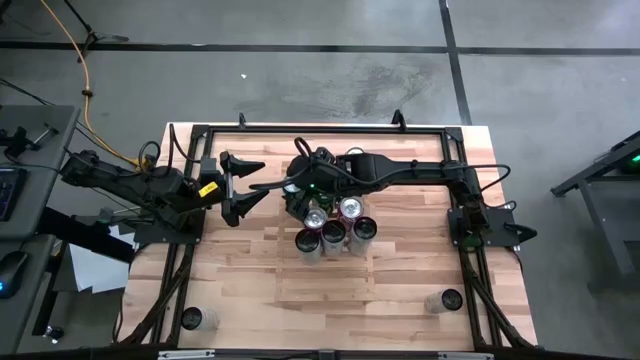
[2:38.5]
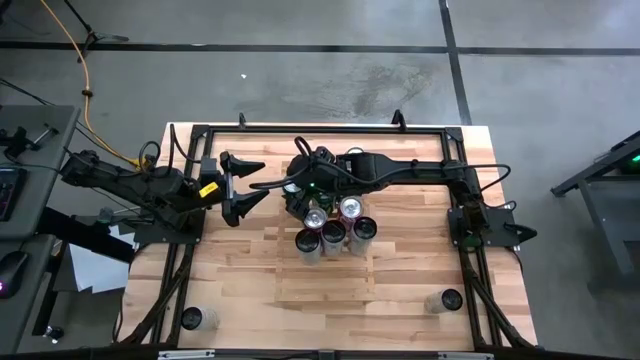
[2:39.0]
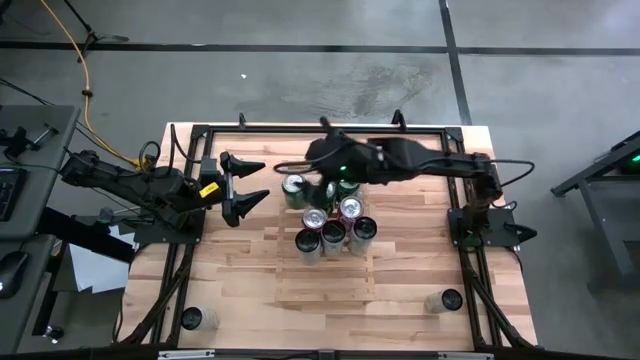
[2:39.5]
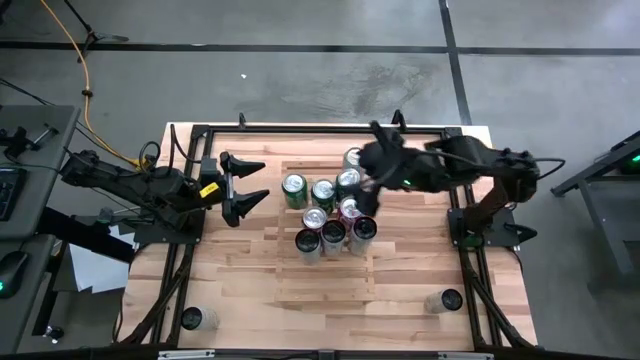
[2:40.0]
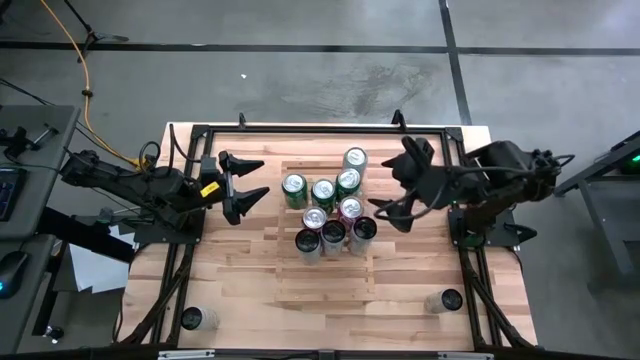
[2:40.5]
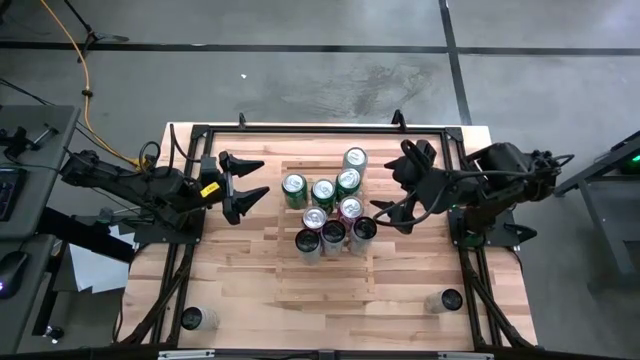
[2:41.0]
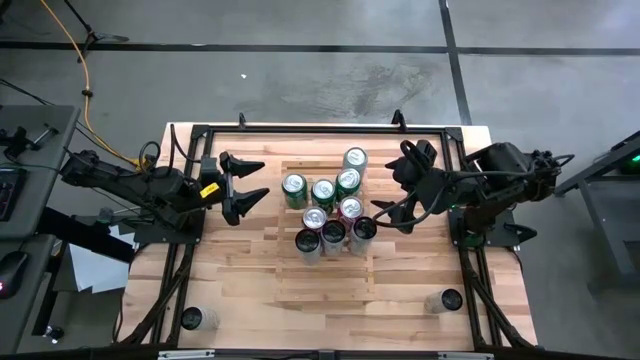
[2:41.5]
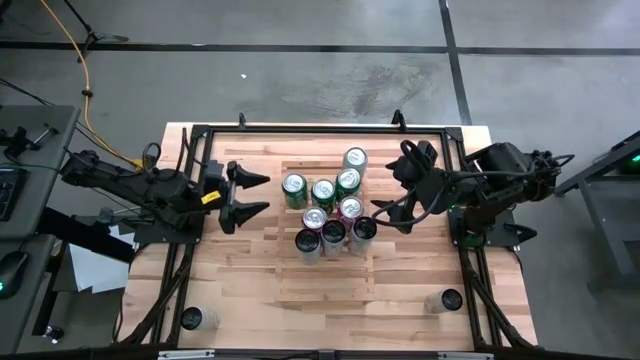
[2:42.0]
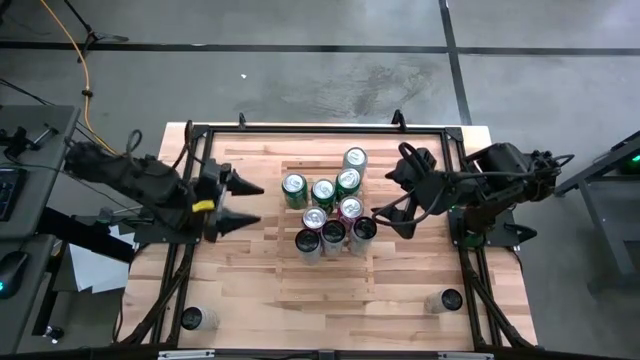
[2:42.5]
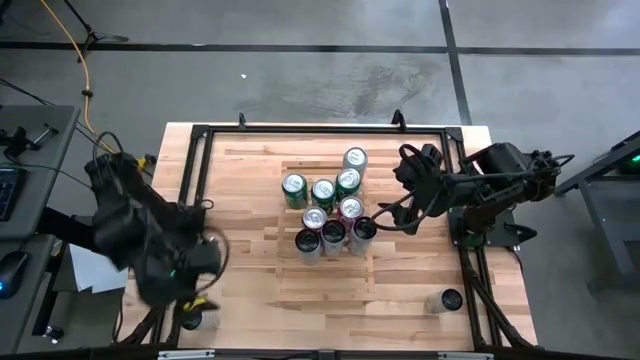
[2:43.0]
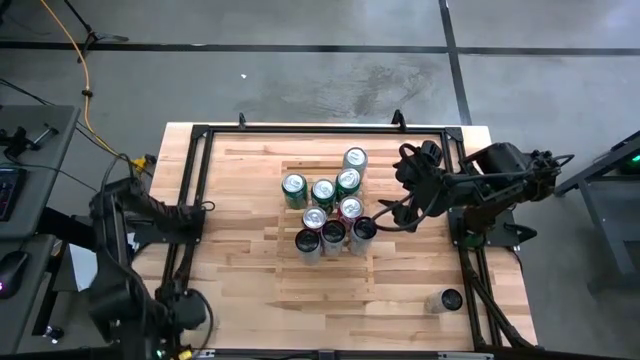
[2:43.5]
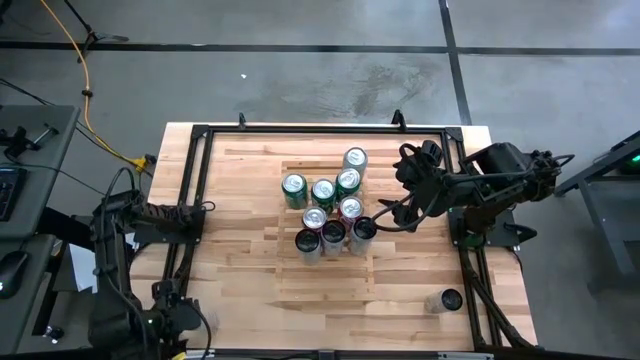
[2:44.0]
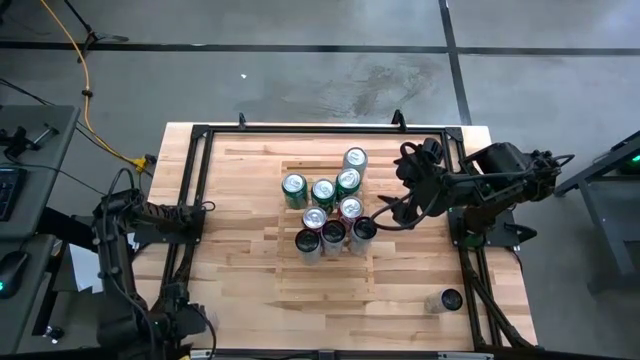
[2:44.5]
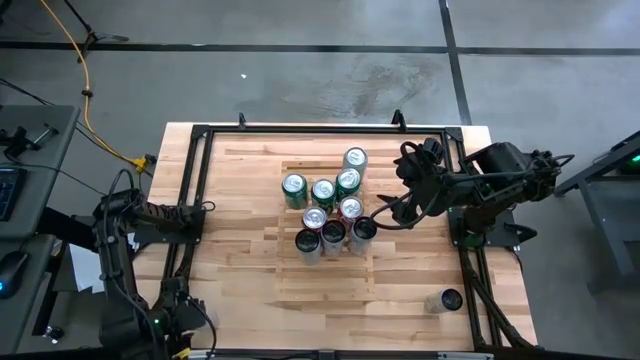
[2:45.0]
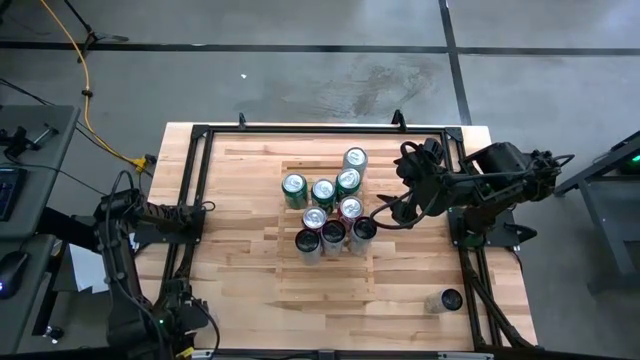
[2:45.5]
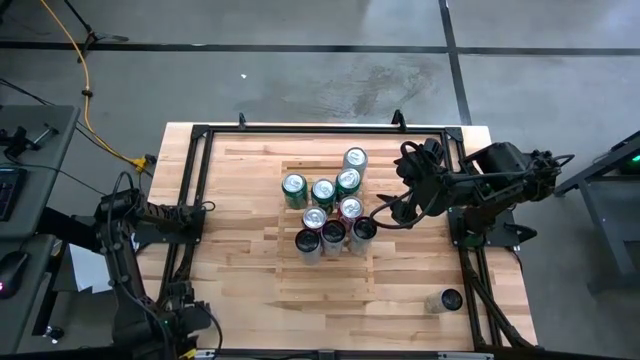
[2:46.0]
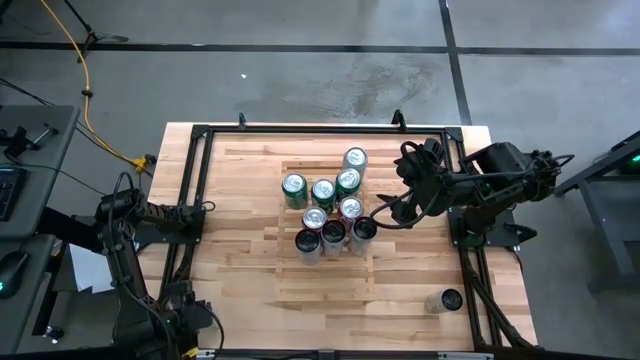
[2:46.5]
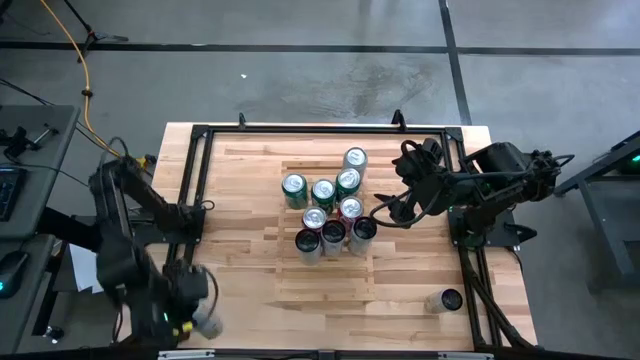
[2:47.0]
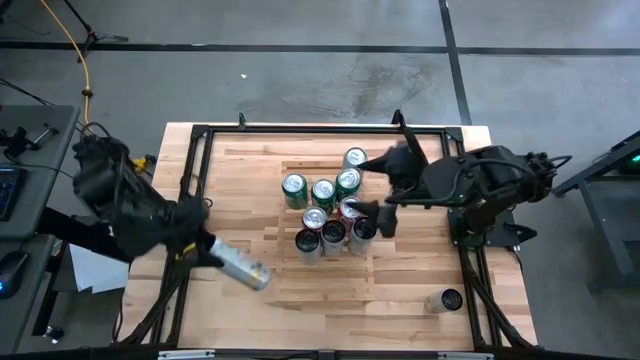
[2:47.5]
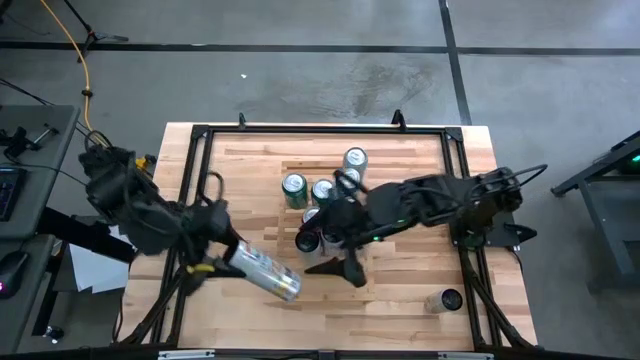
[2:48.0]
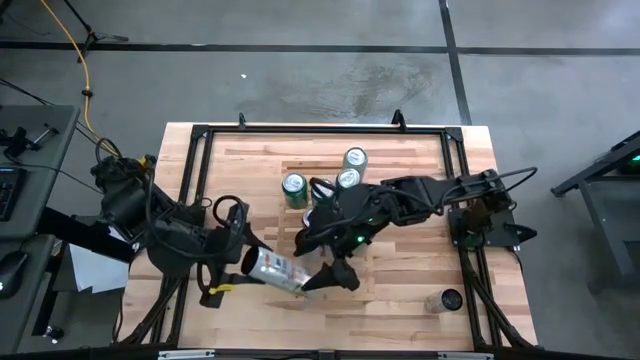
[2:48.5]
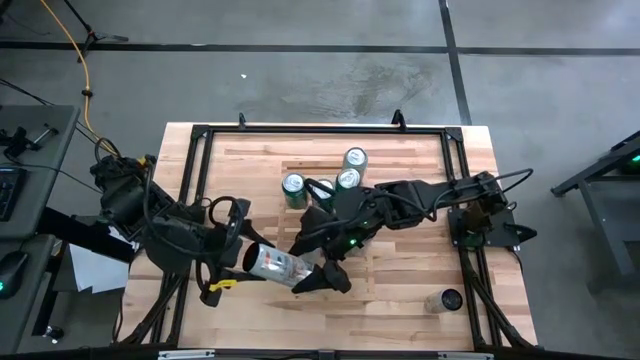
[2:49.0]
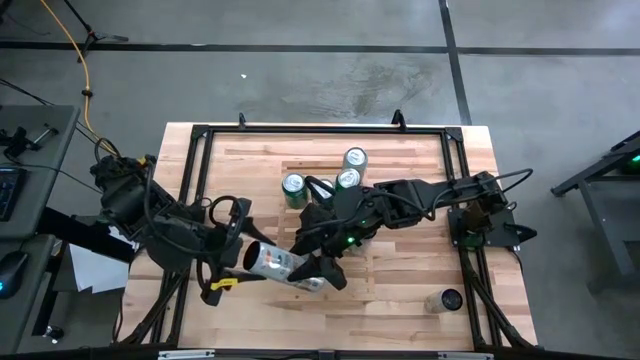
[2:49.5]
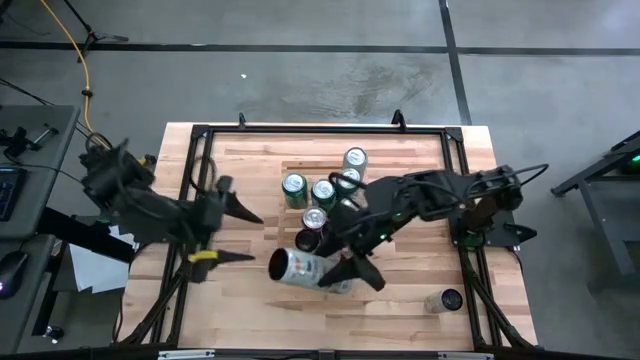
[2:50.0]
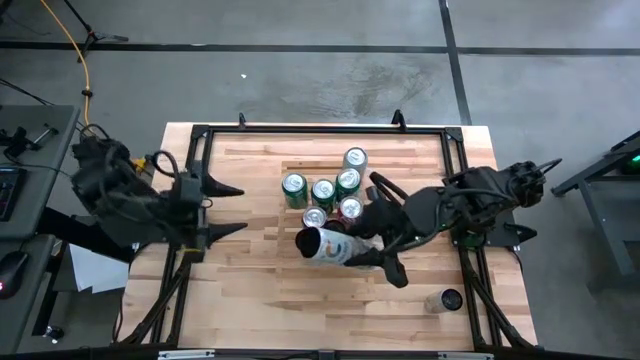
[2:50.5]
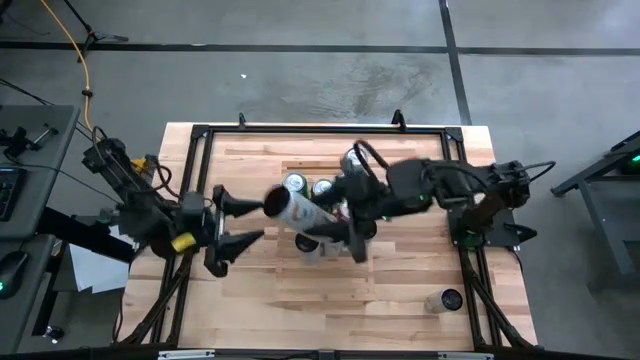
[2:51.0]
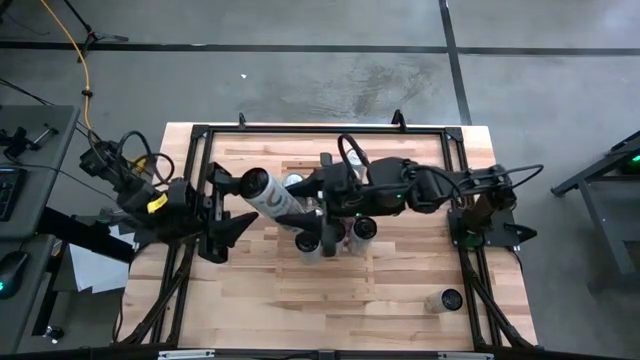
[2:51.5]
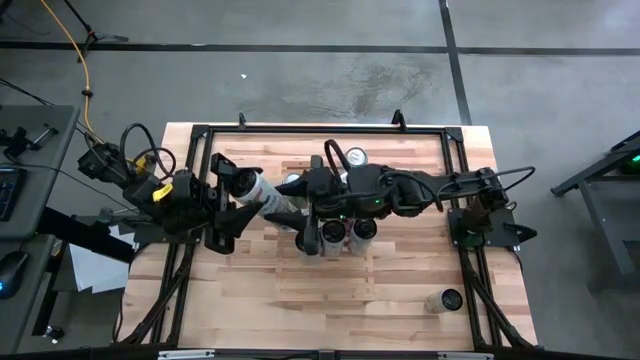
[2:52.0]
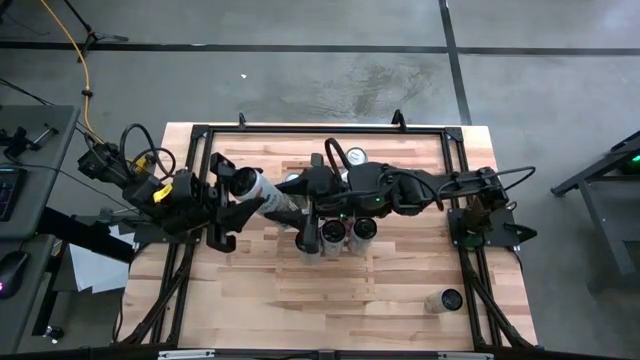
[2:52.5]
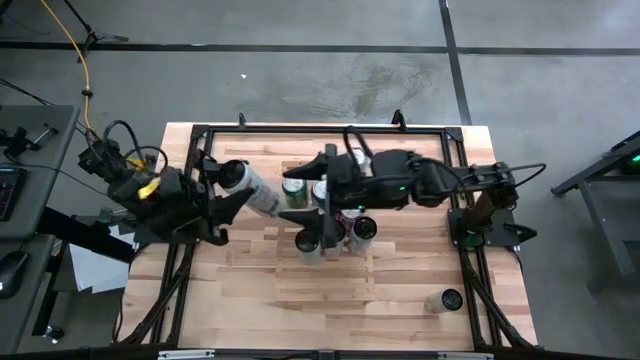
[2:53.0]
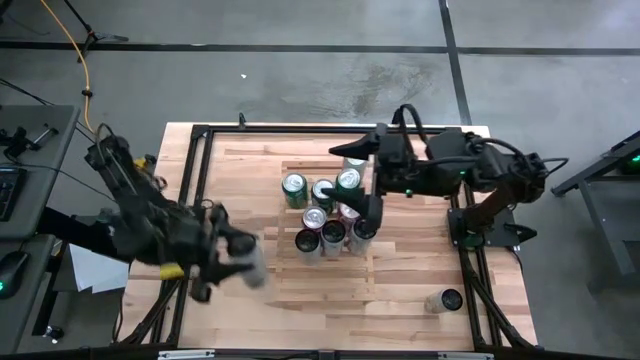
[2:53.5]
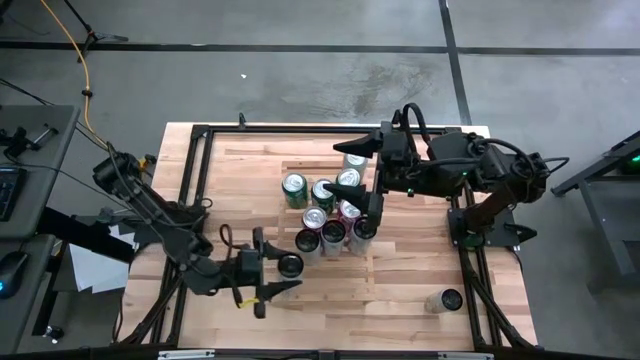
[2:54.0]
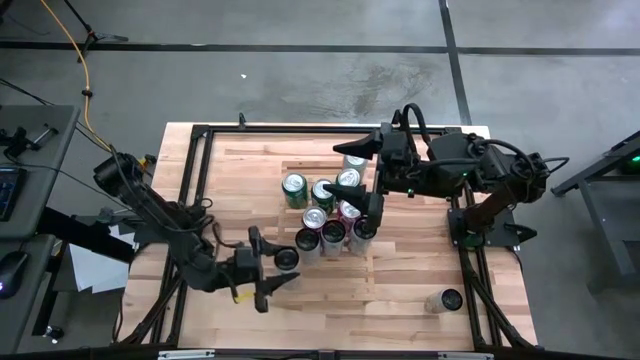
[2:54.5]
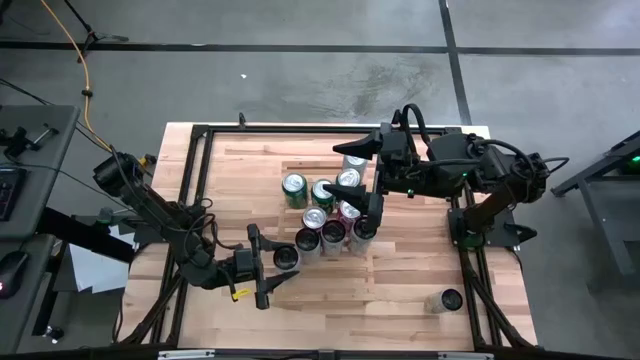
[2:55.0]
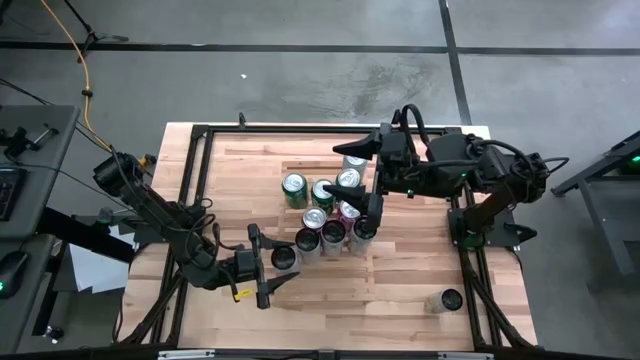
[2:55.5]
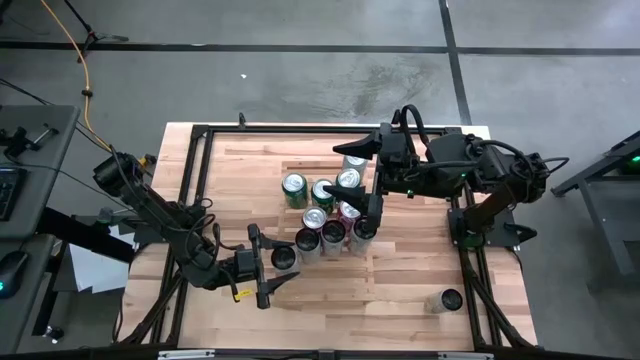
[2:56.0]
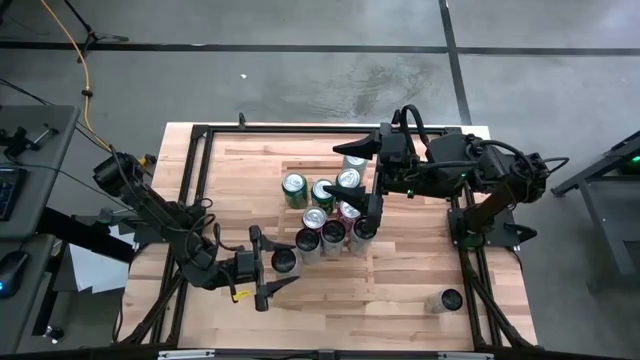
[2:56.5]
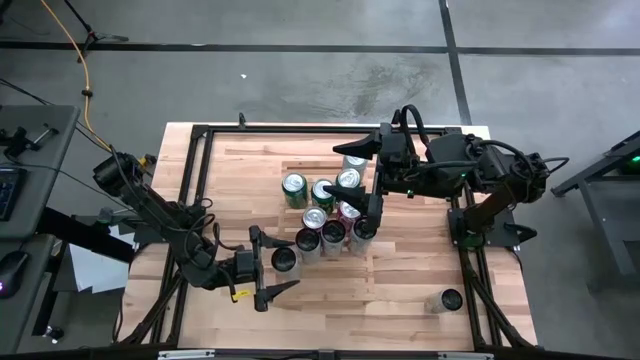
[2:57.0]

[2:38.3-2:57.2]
Task: Place canned beverage on shelf
Put the left white yellow soda can on the shelf

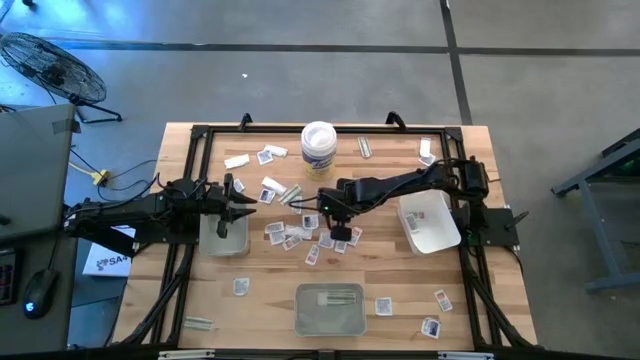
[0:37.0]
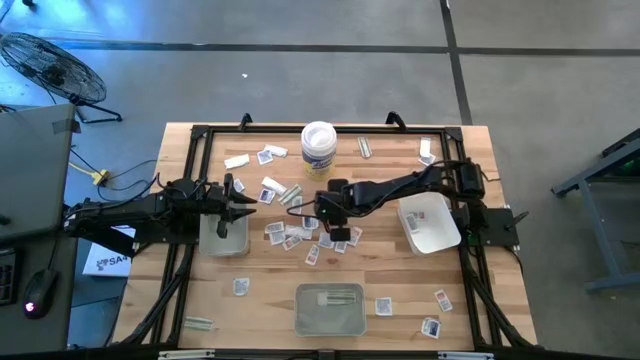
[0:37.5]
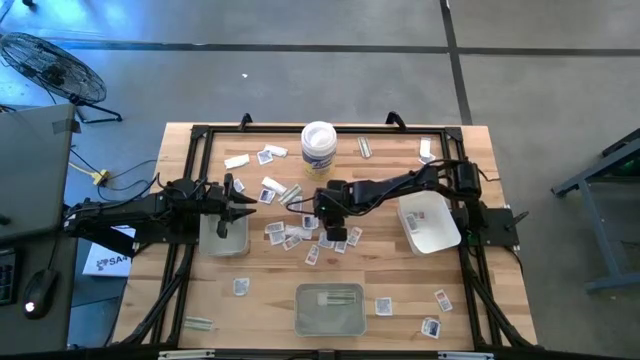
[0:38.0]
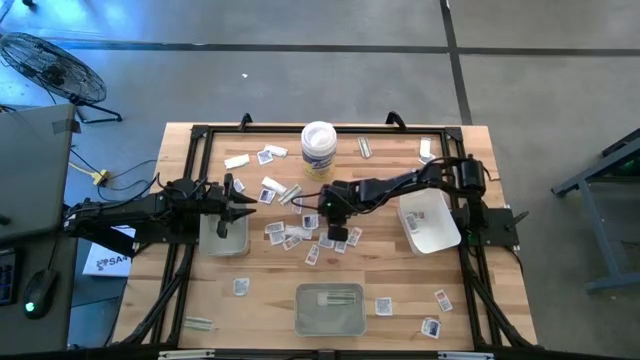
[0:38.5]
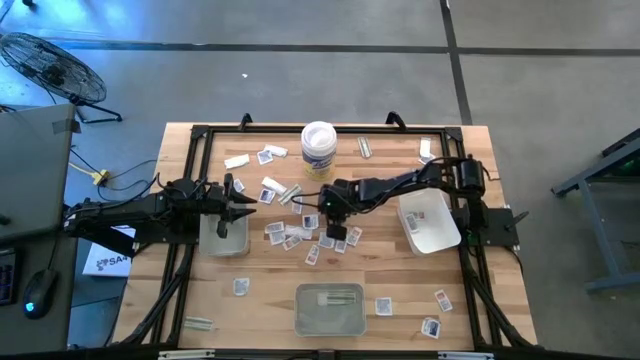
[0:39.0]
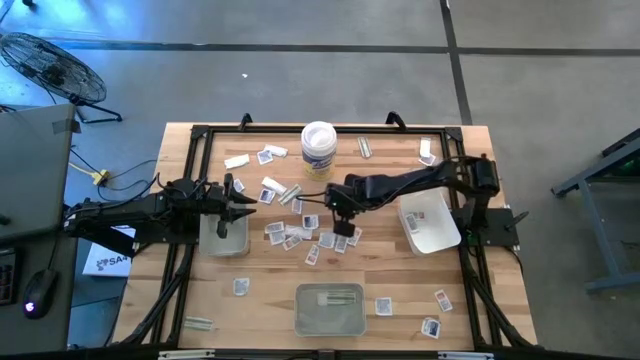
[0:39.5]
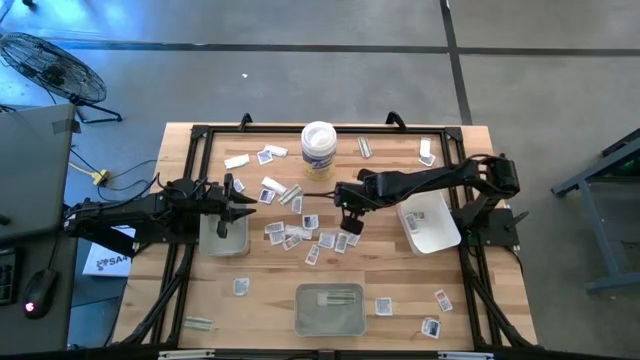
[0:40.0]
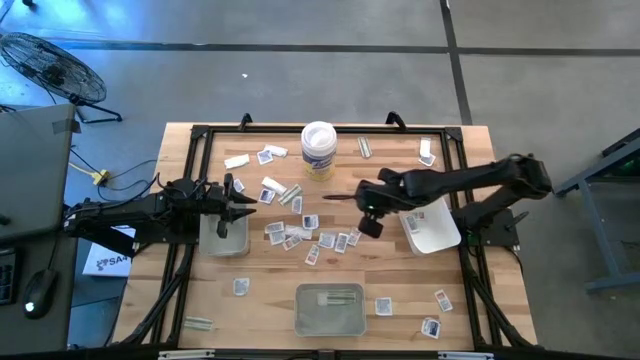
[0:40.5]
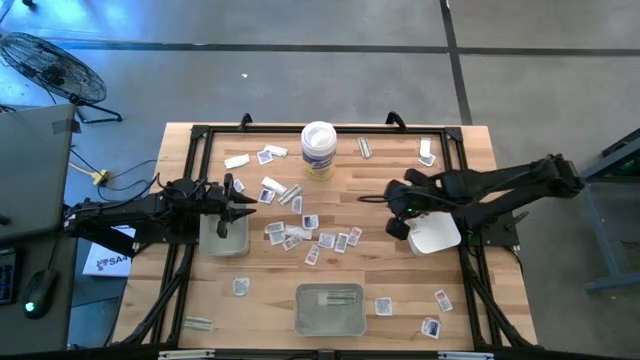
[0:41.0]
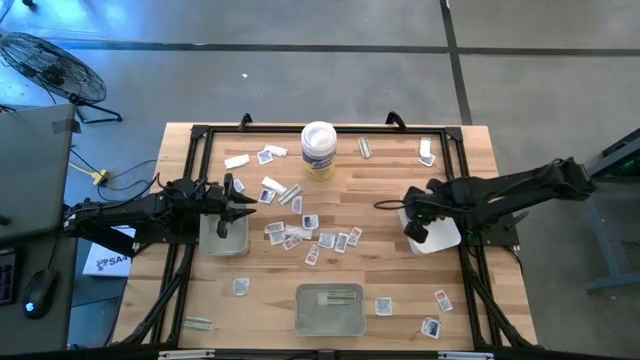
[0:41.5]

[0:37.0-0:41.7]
Task: Pick & Place First Aid Supplies
Put the orange ointment pack into the white bin
